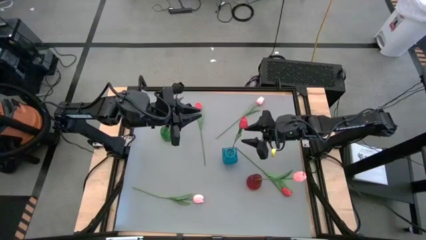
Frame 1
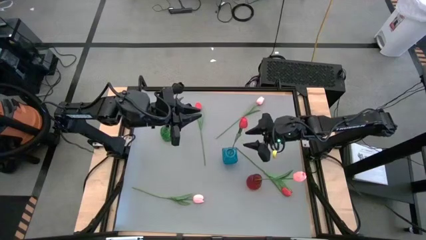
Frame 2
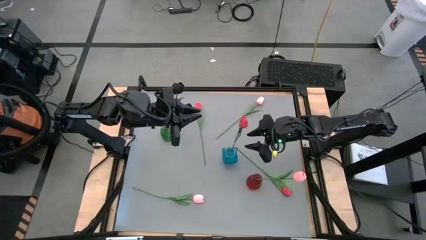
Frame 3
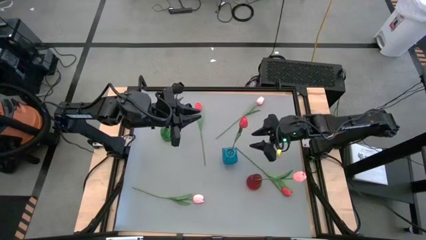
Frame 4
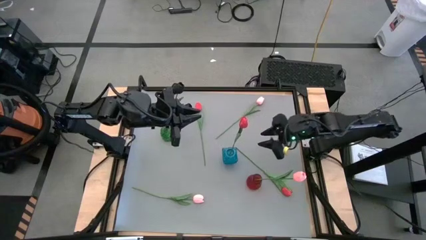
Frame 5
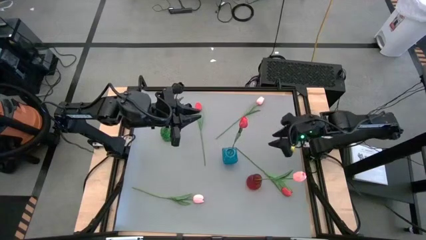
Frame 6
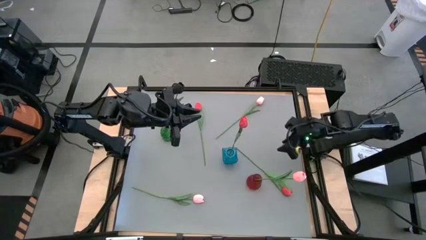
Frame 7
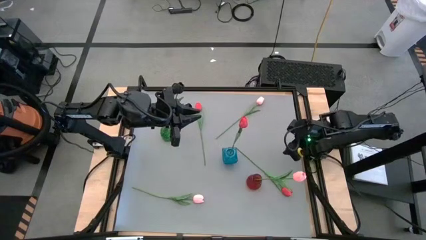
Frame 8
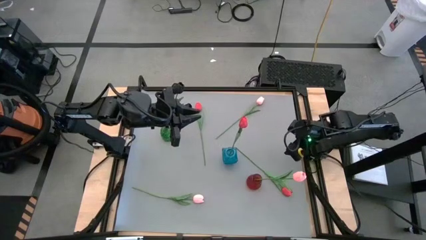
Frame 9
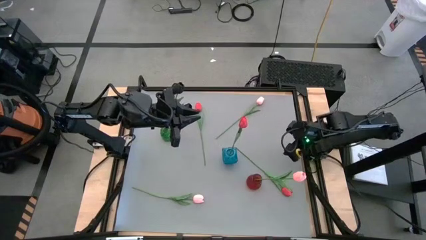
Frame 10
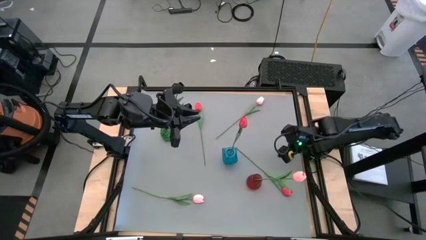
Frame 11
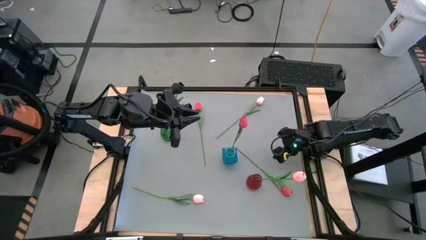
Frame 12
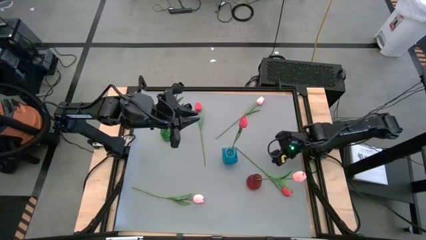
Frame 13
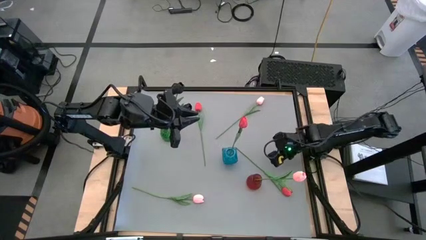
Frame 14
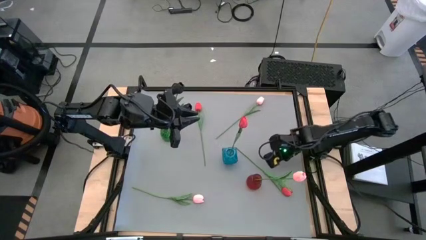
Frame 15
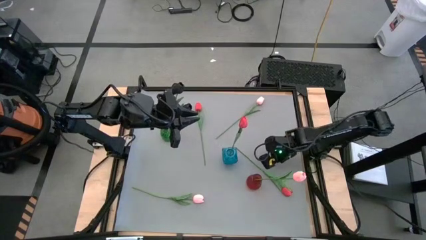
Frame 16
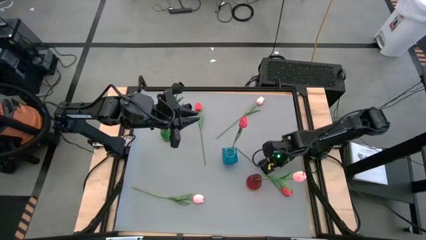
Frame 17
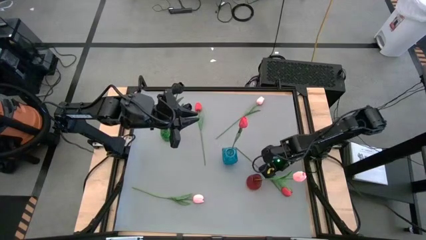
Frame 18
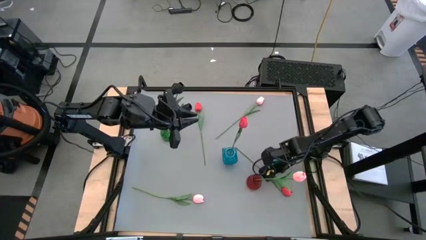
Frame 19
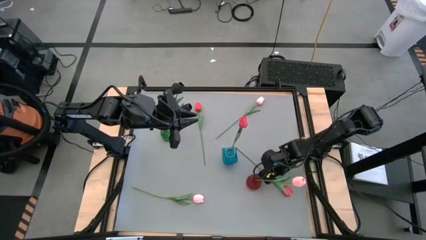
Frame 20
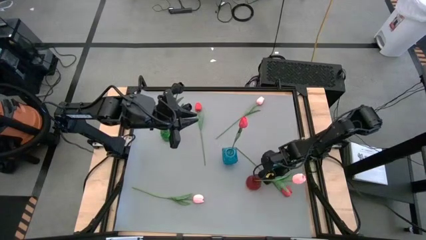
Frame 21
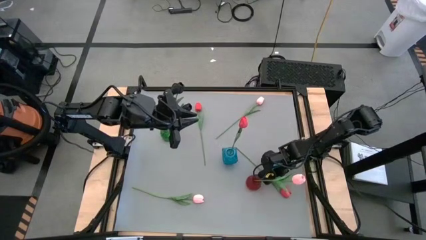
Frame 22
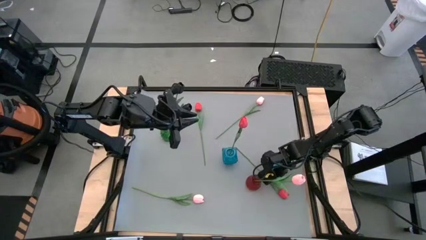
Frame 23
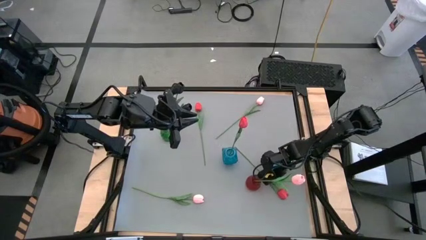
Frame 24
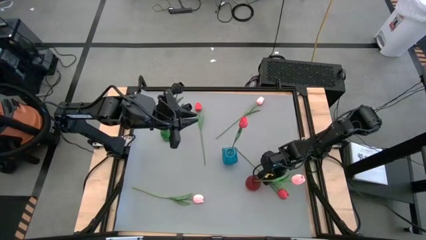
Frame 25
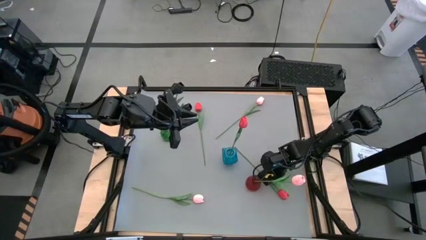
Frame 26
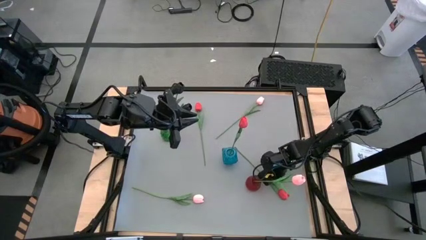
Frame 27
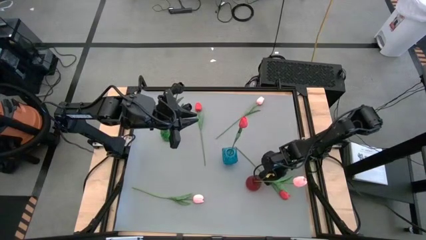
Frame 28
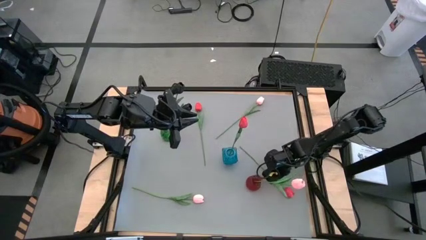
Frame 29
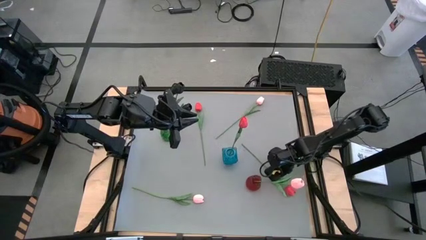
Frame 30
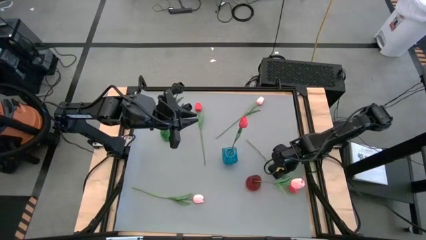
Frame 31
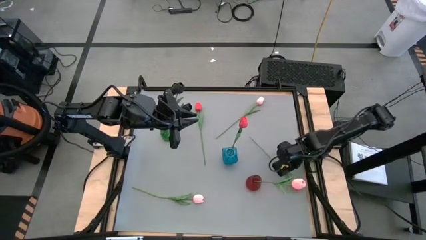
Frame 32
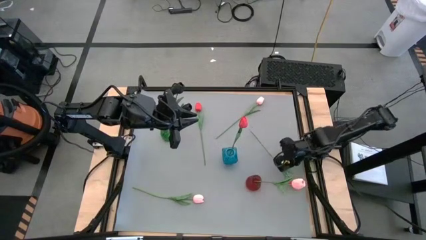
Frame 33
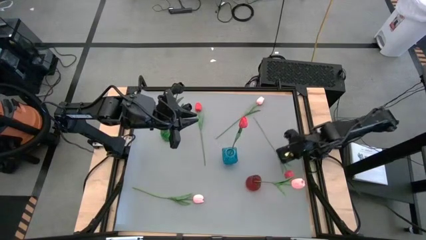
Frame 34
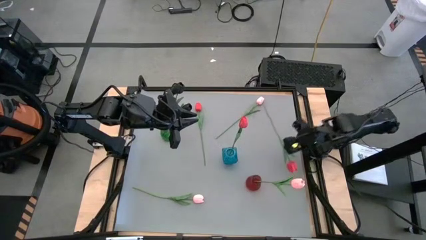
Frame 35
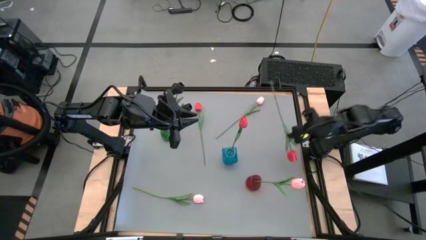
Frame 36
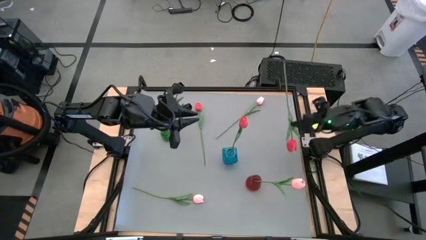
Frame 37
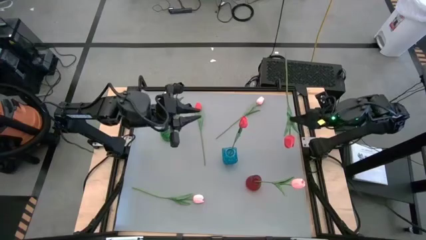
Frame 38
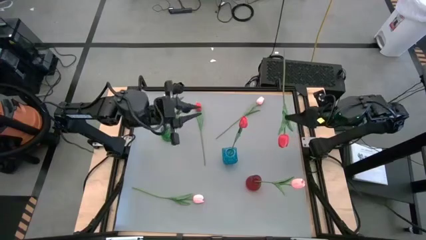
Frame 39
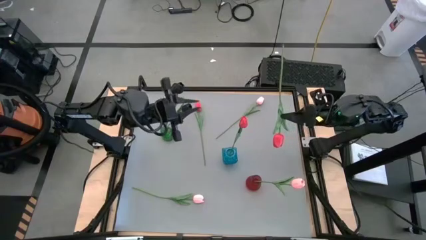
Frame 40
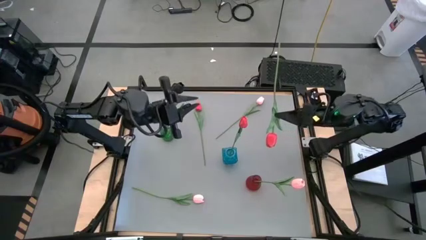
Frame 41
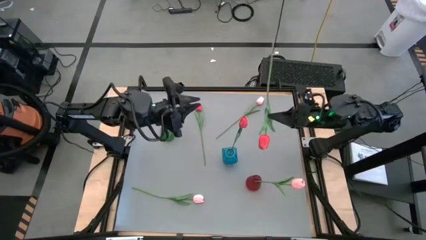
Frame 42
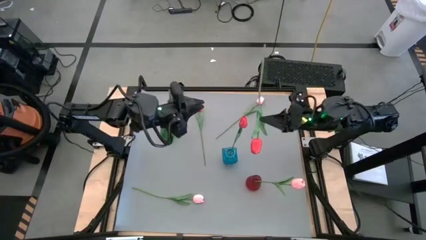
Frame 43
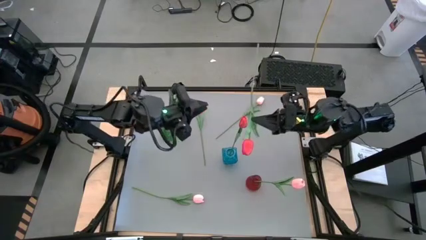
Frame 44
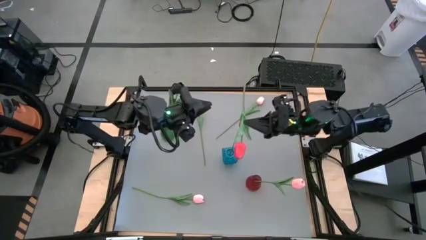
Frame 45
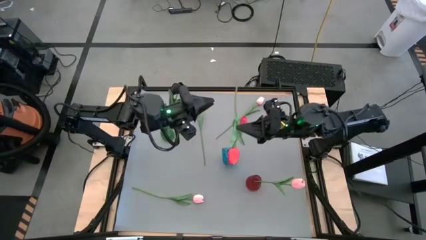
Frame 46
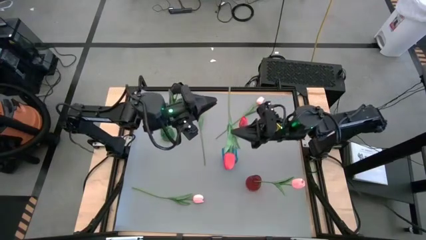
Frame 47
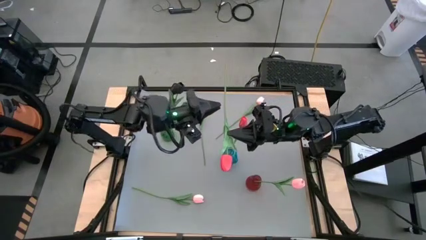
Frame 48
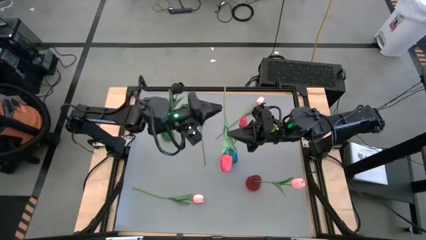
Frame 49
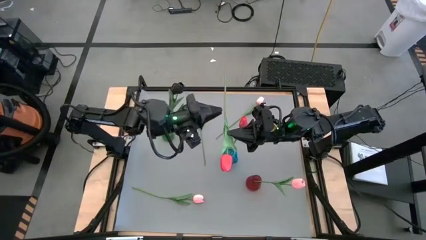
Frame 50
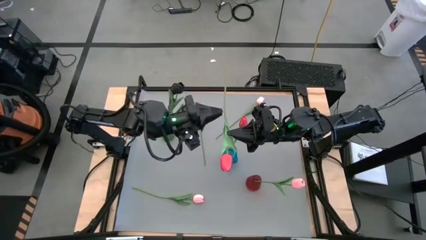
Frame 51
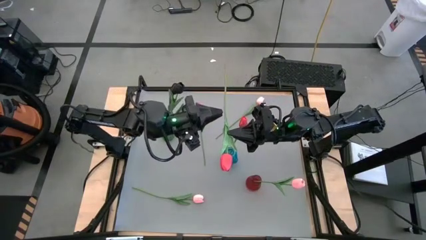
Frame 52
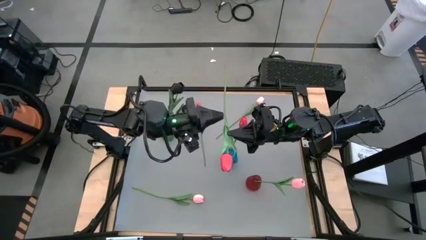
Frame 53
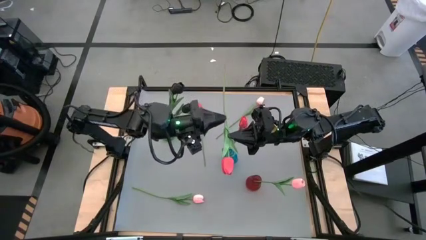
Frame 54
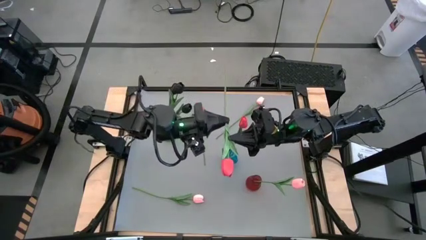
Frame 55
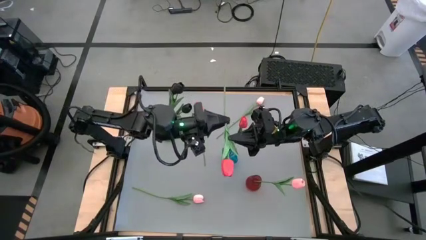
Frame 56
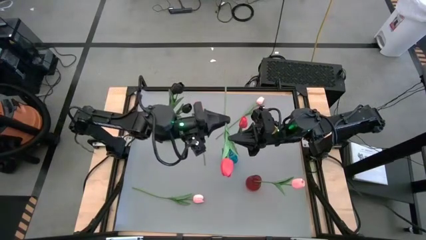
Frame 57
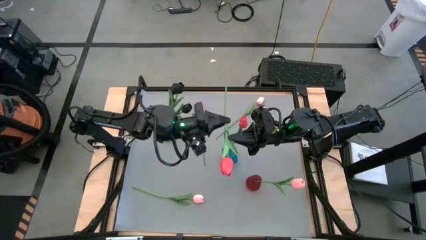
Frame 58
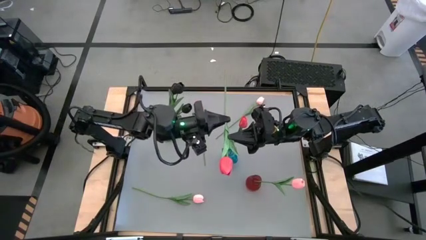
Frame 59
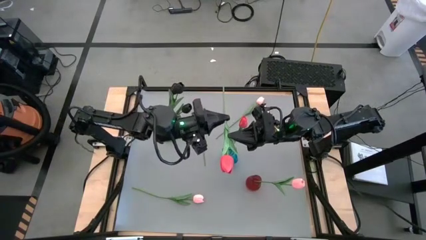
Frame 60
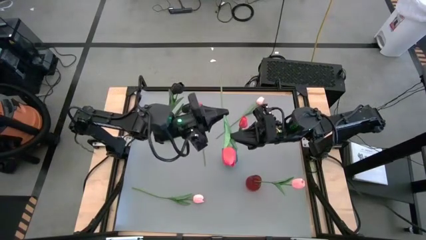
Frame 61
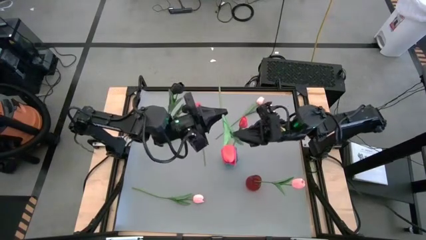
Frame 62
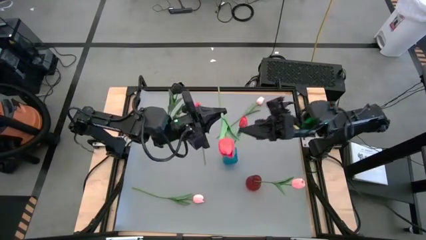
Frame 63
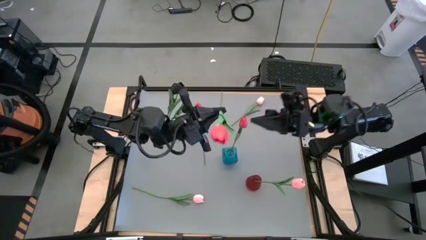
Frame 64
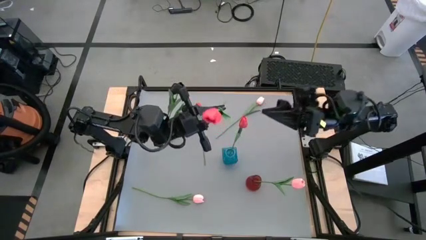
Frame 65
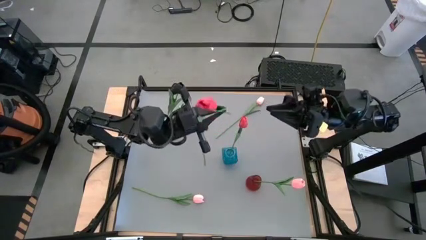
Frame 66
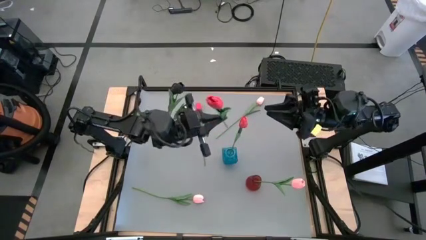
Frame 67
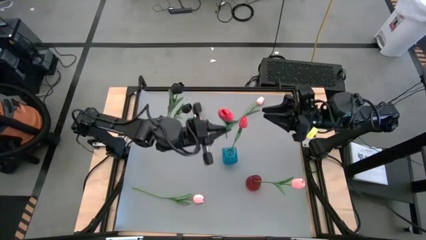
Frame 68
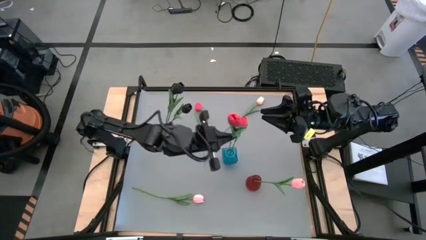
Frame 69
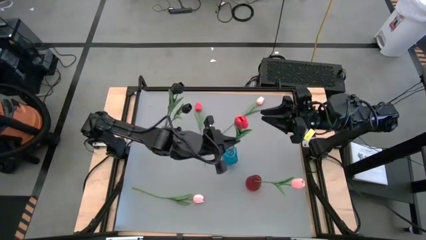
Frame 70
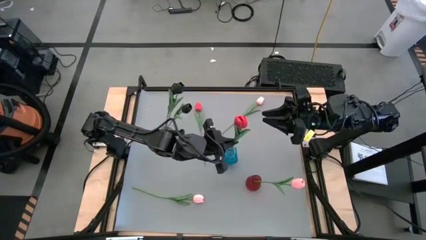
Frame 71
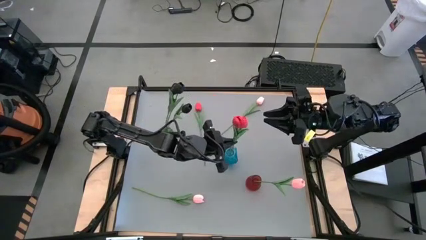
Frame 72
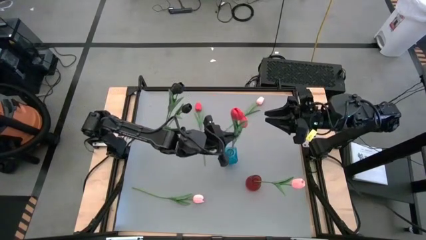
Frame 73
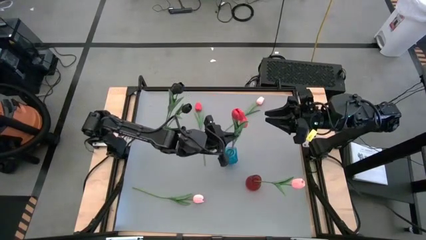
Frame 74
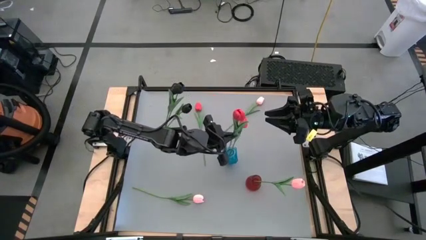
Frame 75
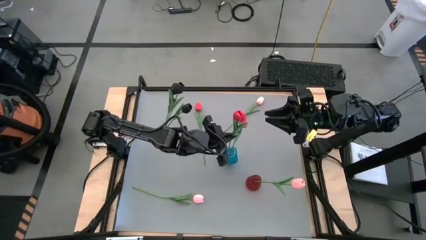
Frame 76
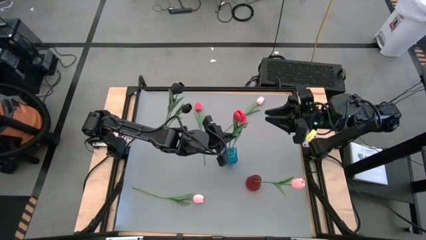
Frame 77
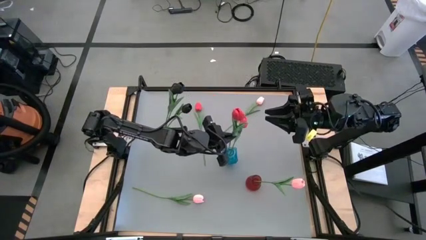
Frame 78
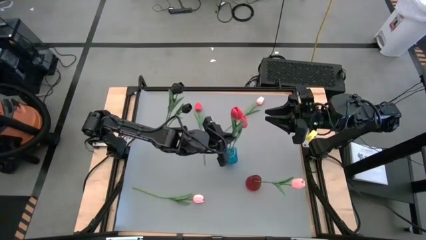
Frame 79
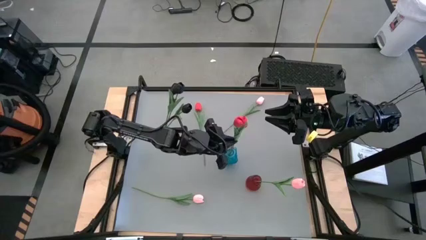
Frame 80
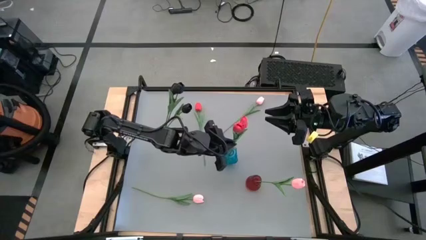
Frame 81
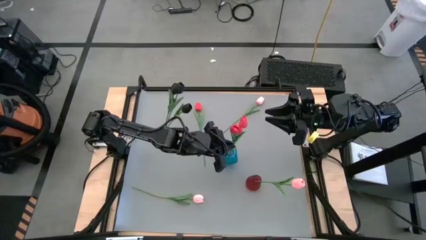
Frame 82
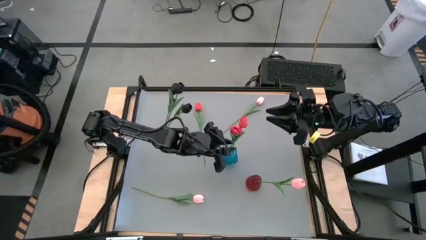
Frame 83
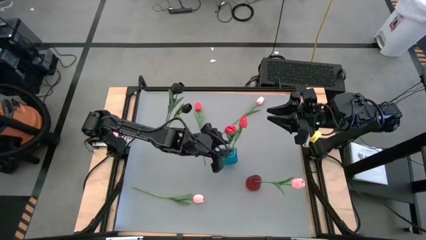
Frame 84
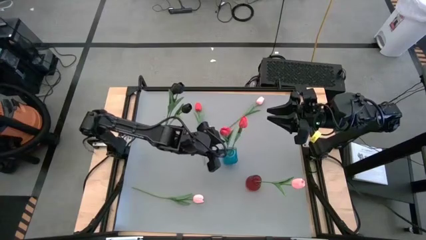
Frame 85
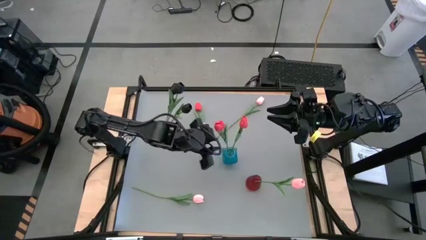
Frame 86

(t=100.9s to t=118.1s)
Task: Sort flowers into vase by color
Put the right red tulip into the blue vase
